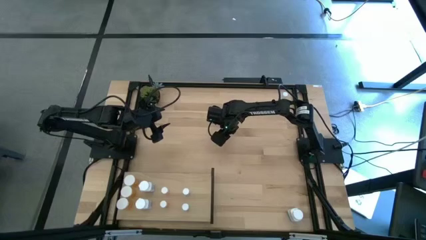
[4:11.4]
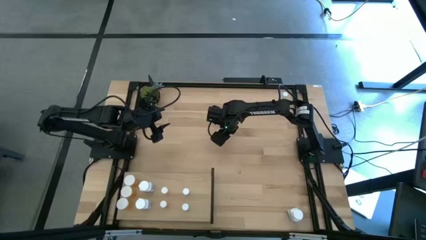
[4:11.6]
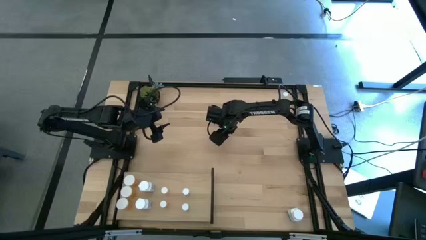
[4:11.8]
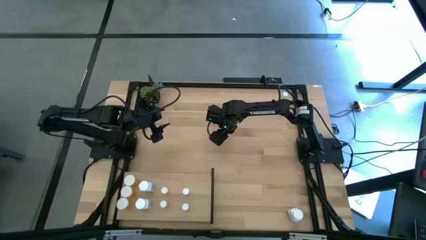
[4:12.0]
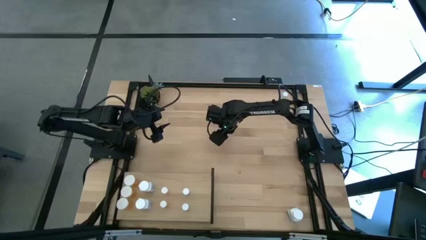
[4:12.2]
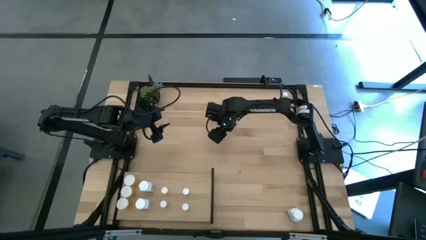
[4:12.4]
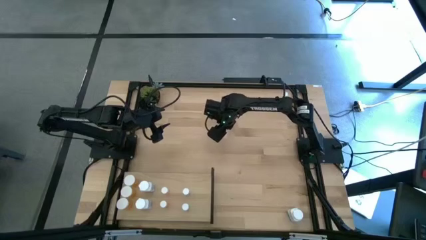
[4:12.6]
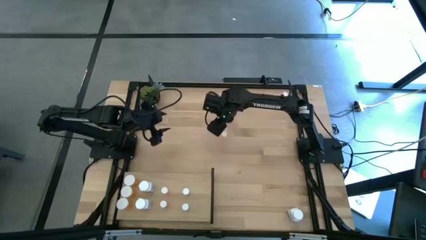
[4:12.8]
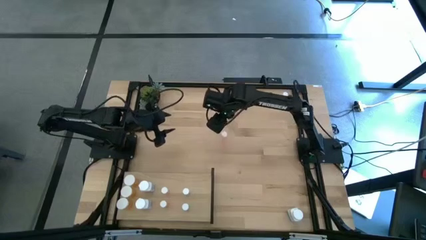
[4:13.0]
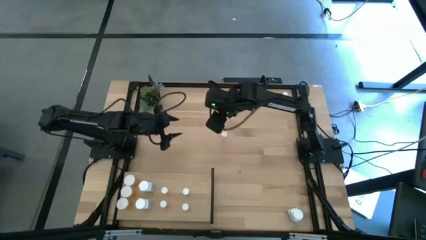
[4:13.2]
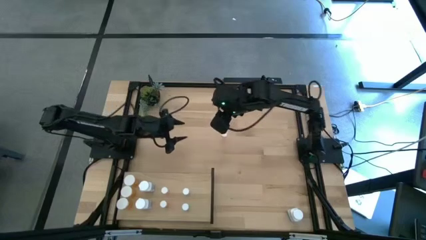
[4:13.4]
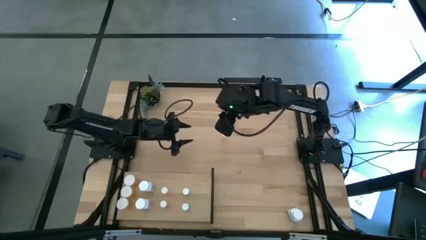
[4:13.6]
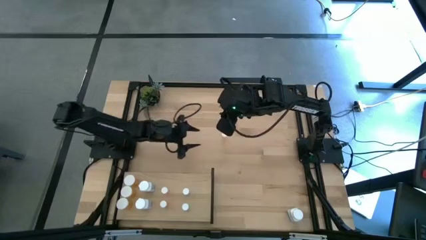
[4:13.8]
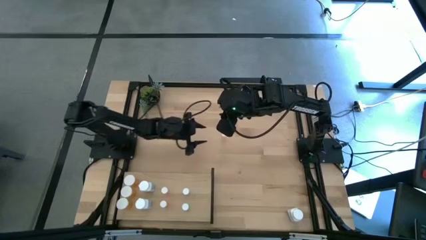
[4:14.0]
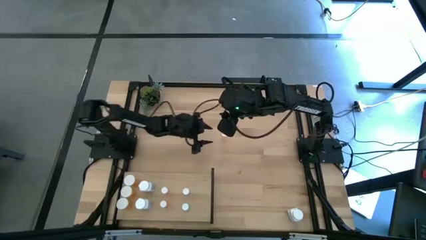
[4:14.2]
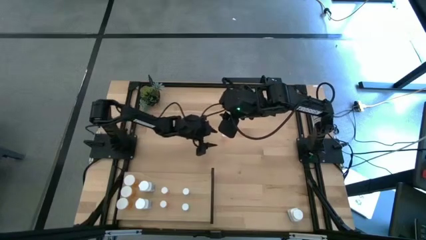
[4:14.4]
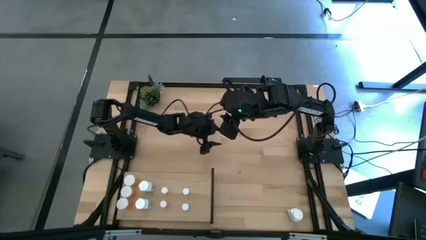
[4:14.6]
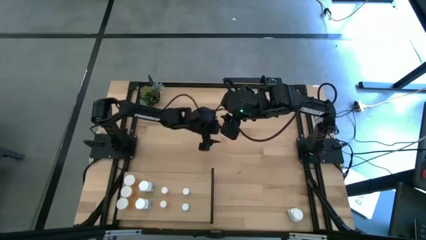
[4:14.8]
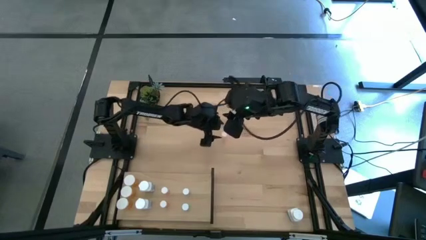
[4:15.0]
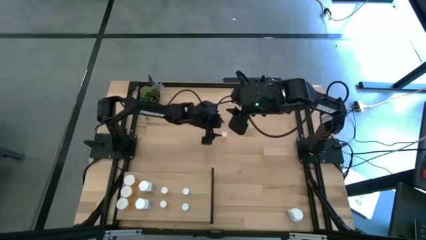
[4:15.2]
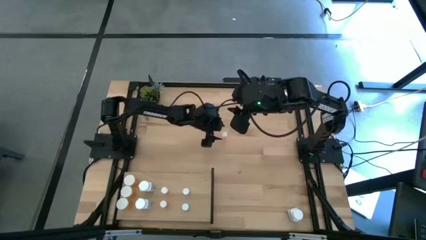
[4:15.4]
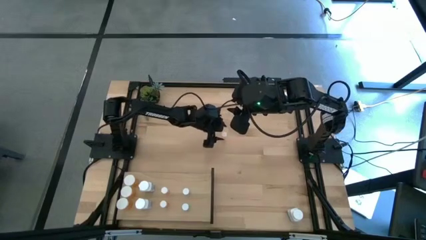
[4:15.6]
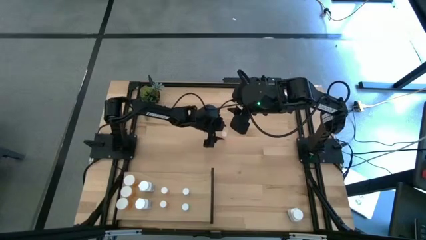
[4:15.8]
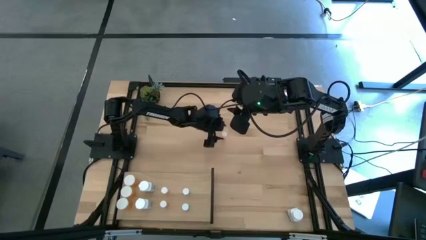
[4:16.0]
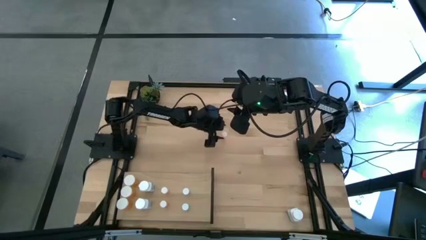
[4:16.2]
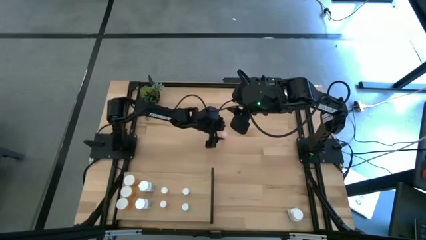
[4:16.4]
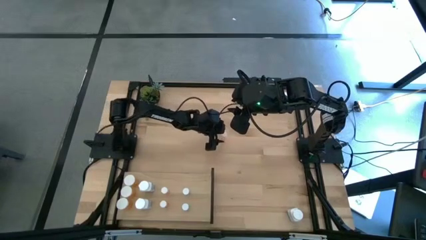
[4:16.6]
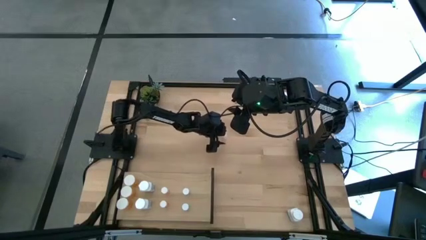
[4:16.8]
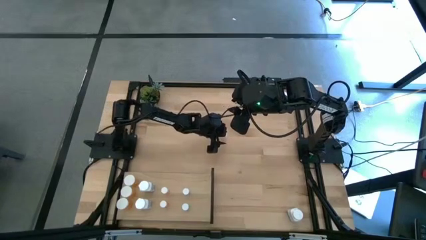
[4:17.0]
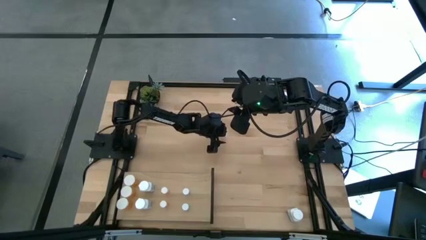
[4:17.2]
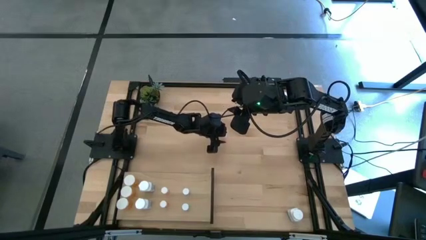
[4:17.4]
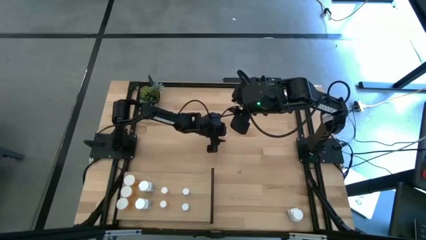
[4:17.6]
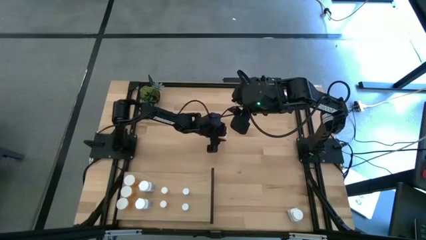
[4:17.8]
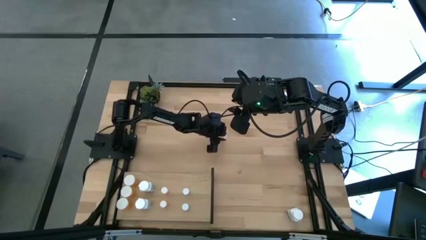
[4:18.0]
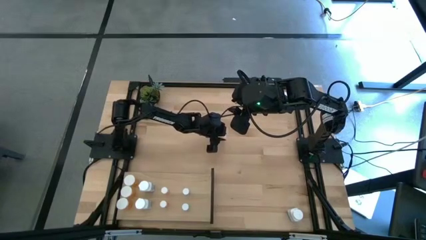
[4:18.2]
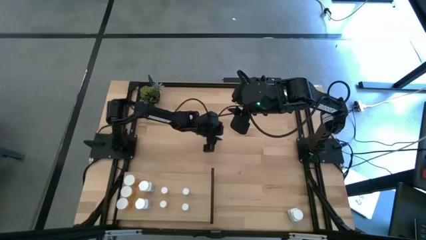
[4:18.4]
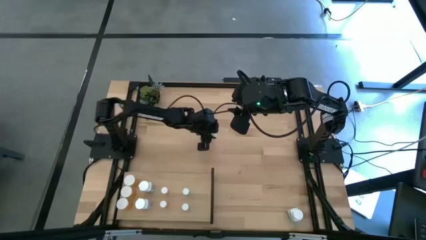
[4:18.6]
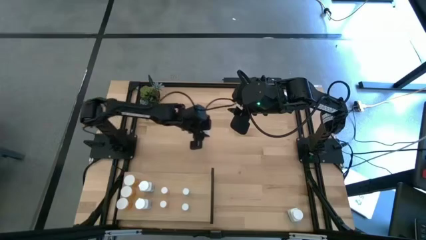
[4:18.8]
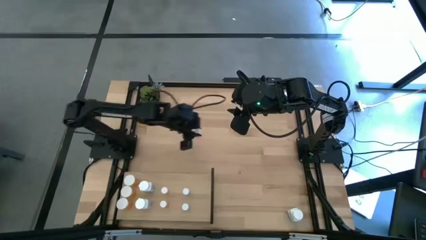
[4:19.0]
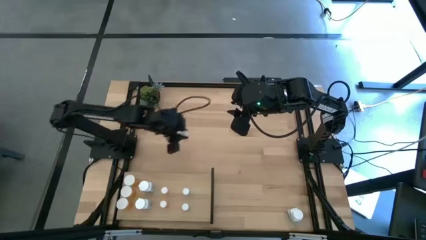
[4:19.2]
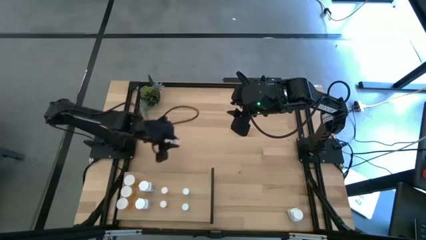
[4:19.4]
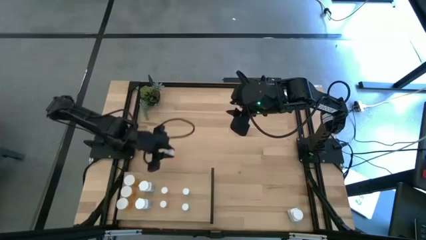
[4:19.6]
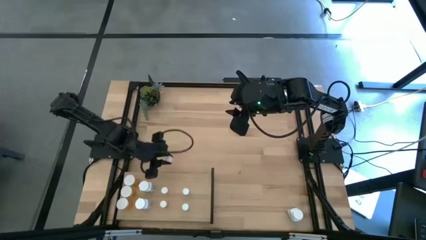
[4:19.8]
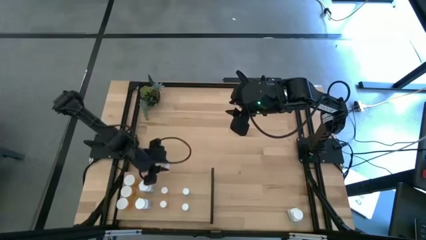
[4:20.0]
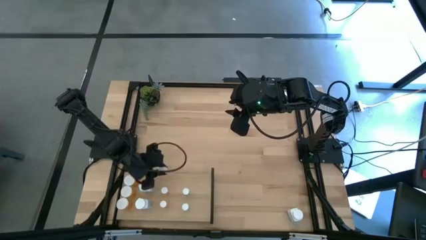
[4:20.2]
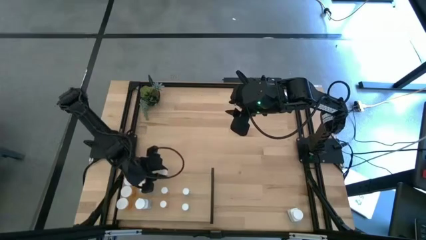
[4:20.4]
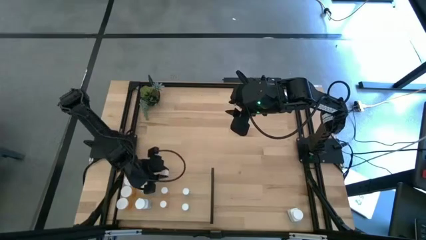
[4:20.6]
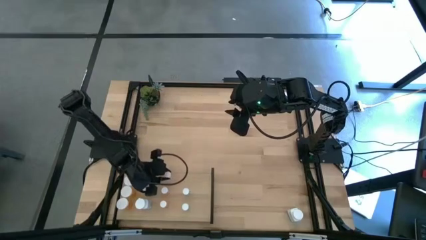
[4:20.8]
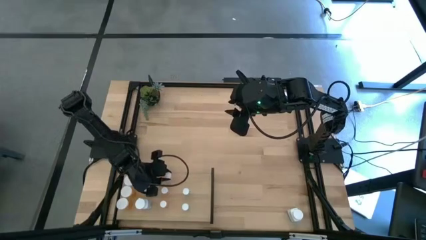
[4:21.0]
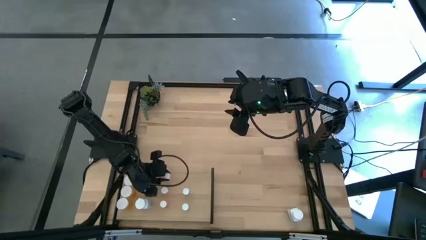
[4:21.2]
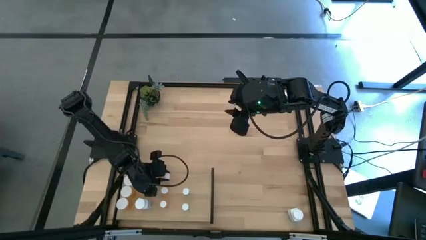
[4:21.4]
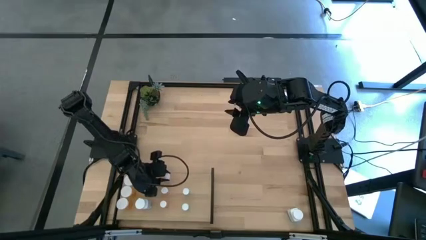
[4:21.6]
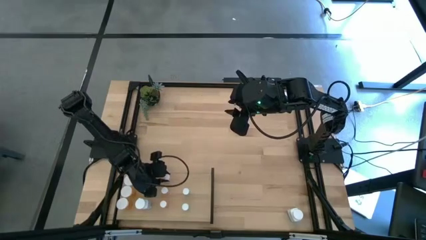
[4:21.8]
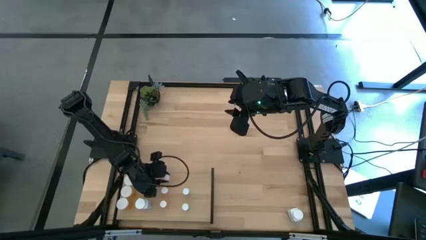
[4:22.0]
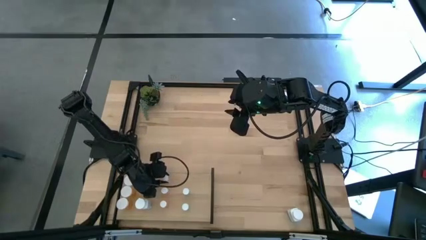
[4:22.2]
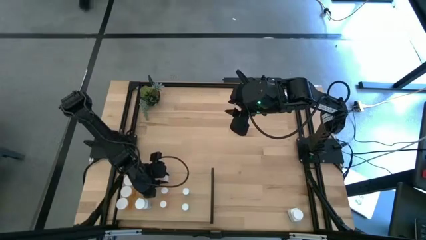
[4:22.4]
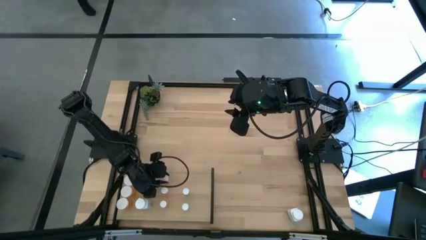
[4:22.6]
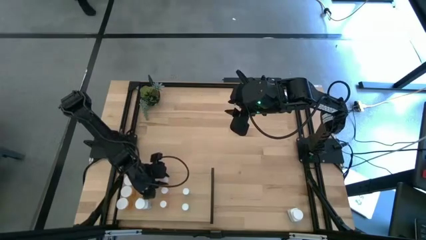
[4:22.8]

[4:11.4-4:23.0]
Task: Pick and place medicine bottles onto shelf by color
Put the small red pill bottle on the shelf aligned with the other small red pill bottles

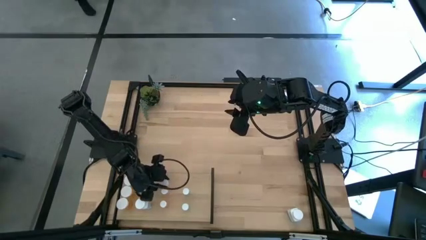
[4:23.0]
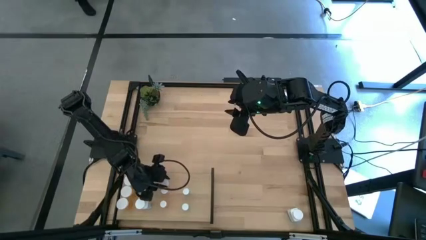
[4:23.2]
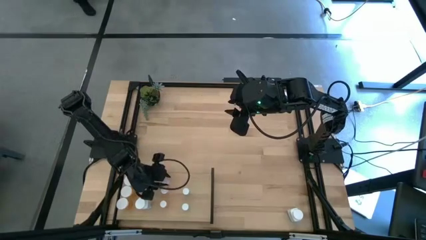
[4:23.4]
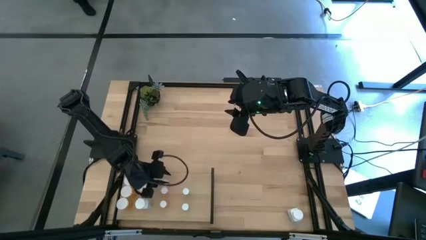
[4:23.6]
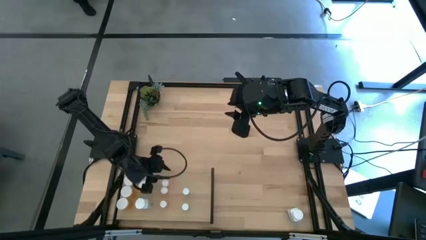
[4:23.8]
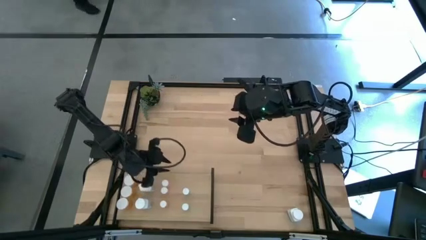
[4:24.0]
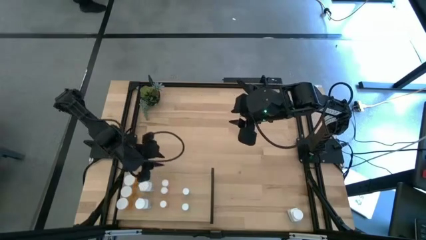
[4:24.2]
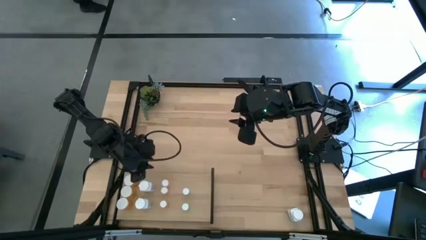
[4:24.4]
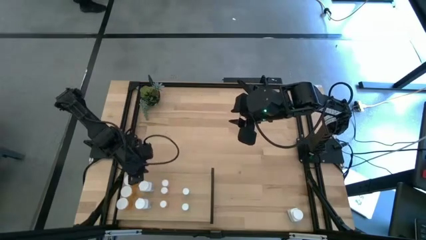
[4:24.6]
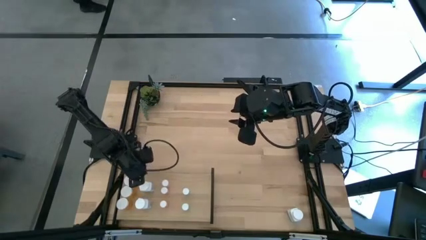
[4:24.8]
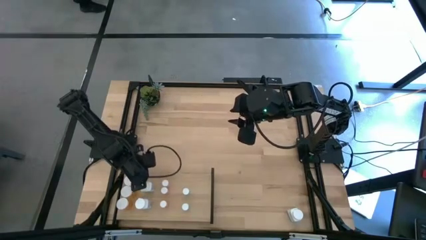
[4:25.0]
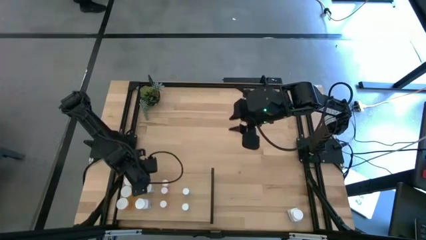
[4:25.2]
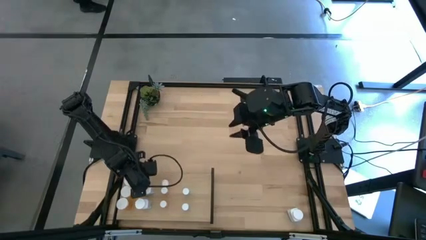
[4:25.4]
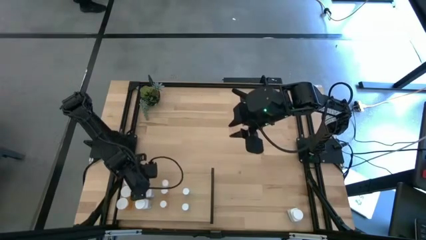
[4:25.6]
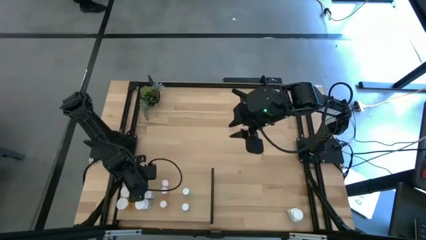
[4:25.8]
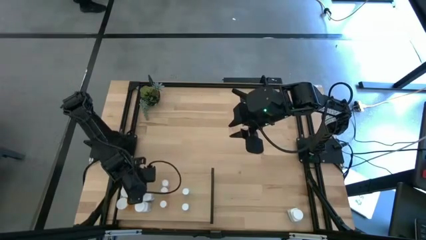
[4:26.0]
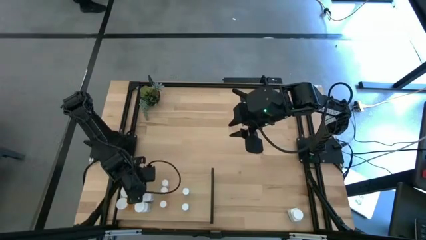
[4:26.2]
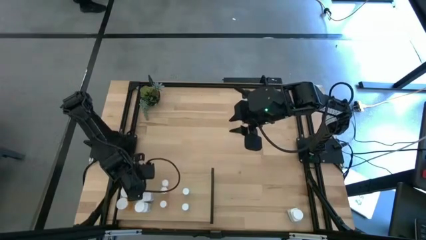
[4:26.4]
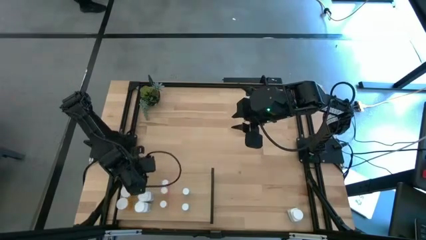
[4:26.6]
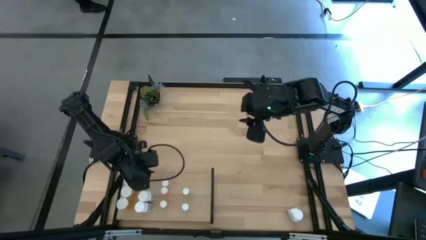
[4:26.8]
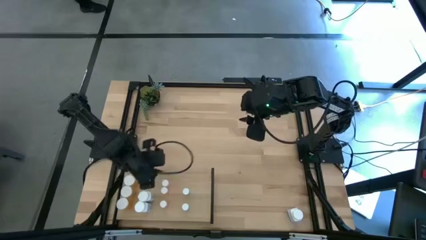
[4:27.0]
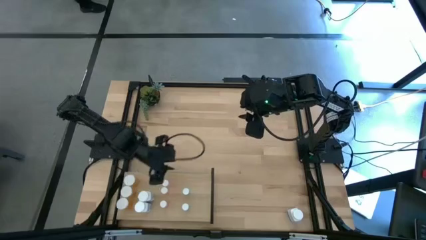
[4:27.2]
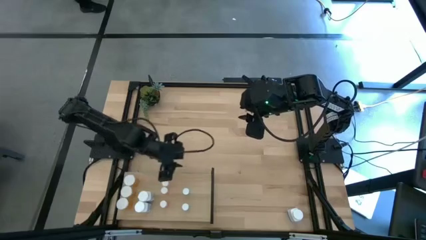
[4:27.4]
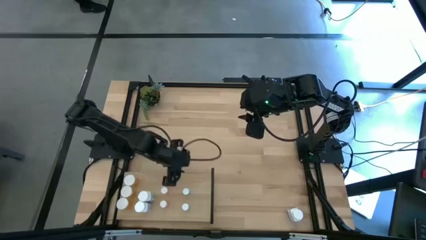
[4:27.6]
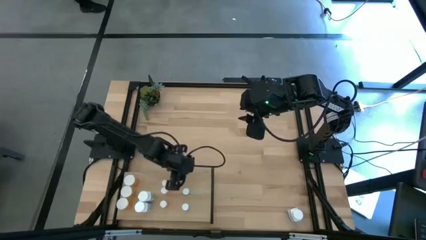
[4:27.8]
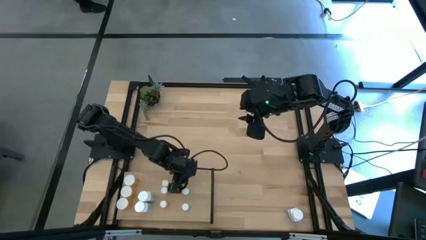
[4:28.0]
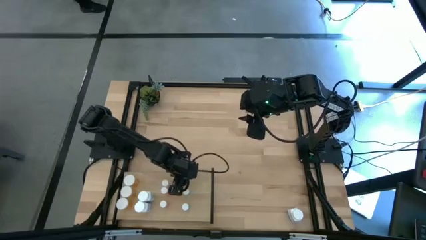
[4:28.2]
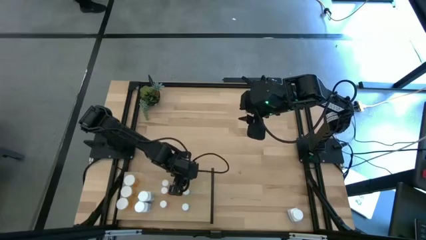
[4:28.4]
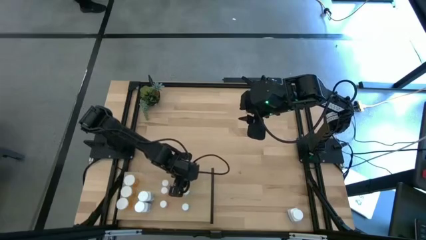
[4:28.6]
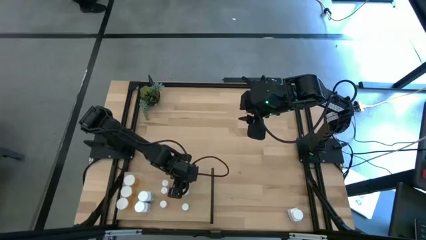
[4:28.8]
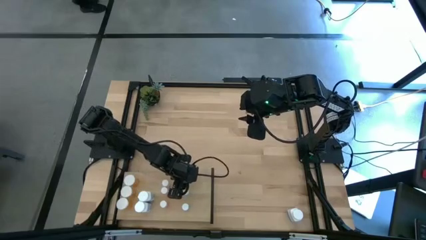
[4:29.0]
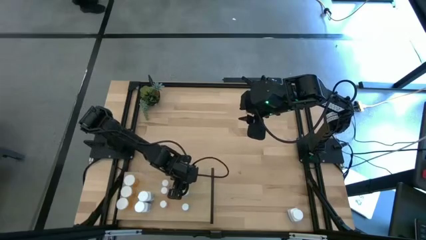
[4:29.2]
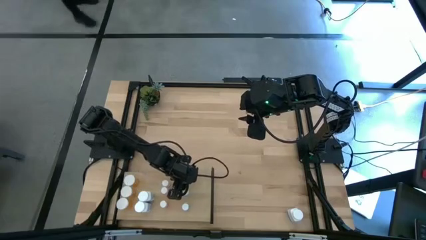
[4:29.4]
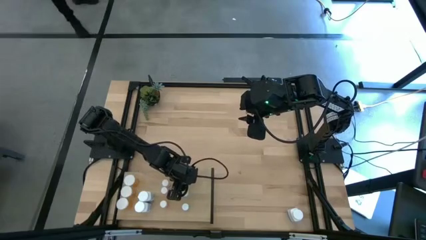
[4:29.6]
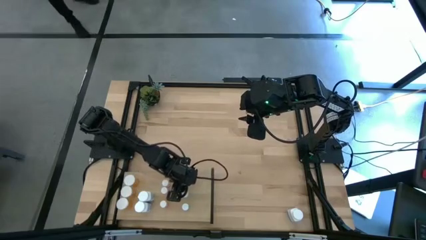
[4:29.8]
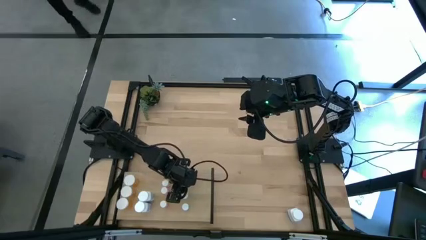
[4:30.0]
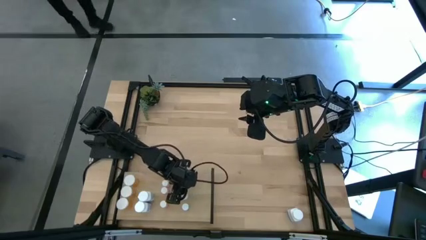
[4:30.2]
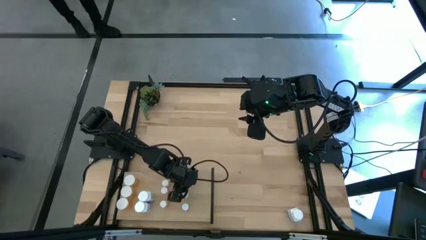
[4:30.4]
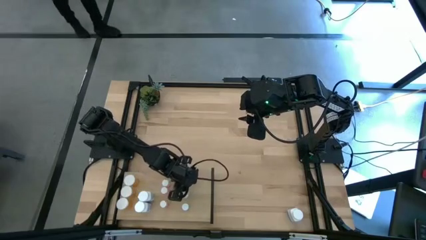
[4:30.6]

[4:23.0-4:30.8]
Adjust the pill bottles on the shelf
